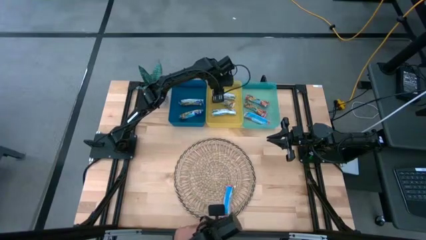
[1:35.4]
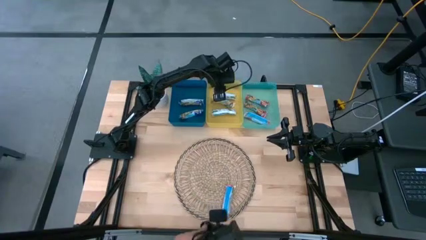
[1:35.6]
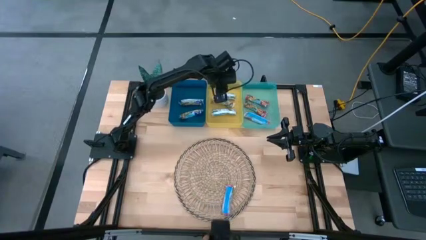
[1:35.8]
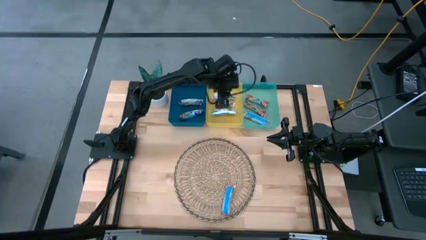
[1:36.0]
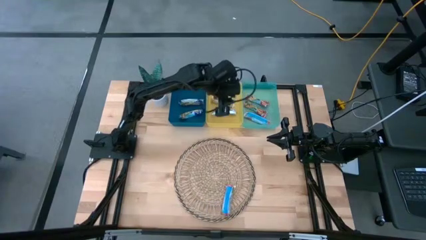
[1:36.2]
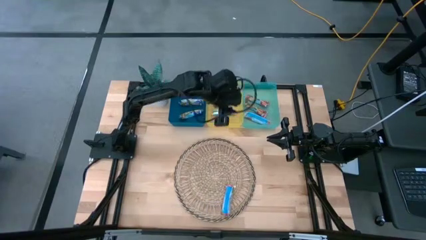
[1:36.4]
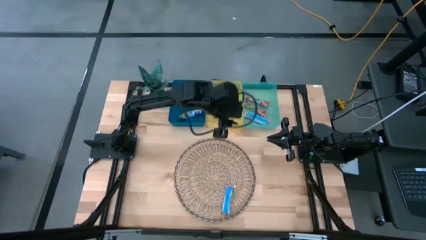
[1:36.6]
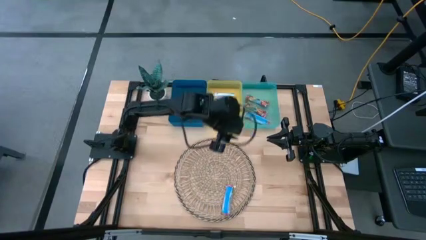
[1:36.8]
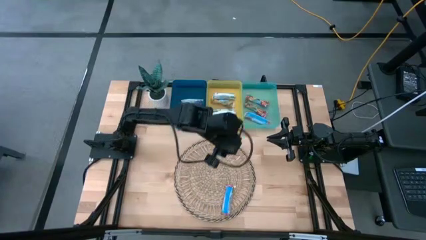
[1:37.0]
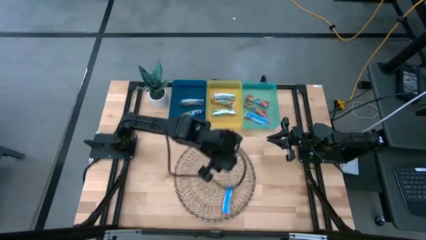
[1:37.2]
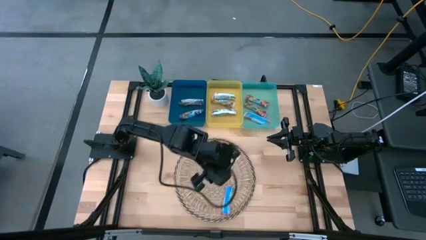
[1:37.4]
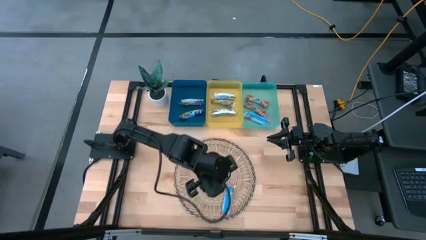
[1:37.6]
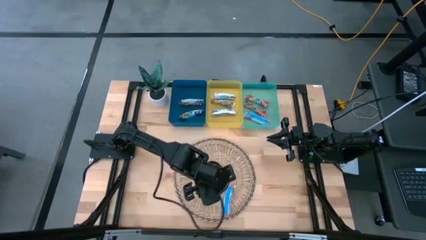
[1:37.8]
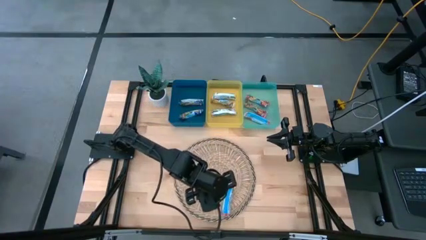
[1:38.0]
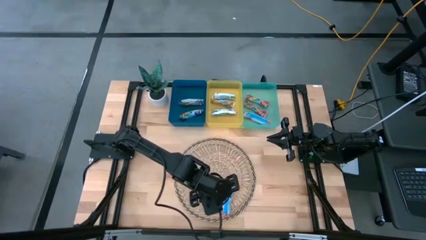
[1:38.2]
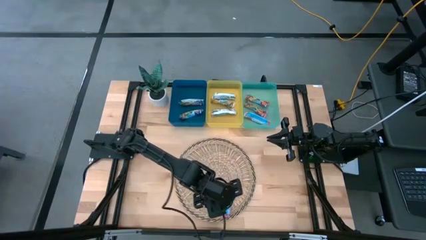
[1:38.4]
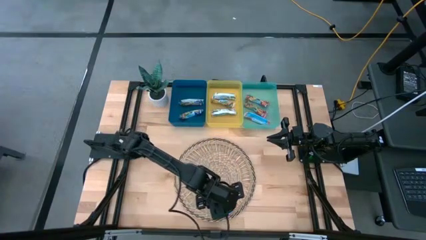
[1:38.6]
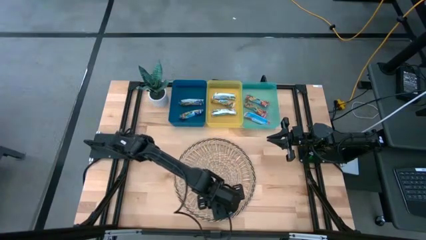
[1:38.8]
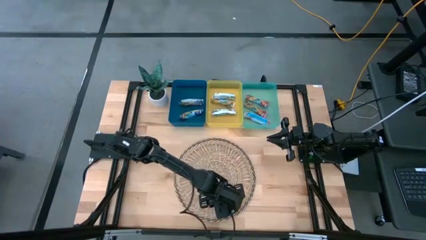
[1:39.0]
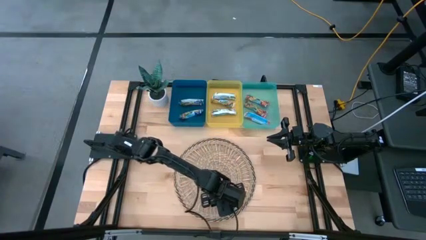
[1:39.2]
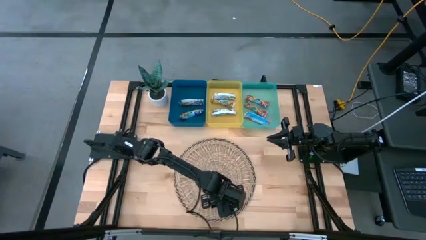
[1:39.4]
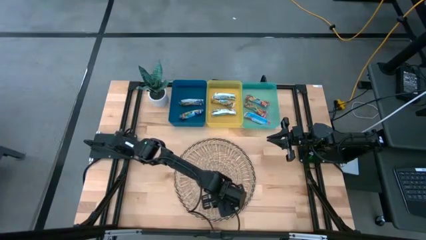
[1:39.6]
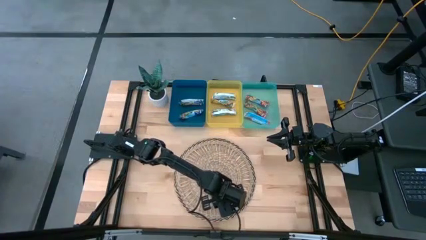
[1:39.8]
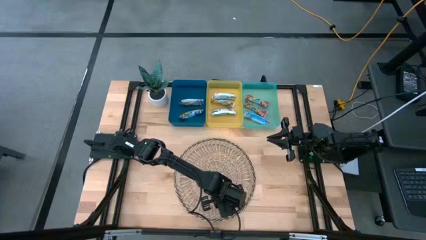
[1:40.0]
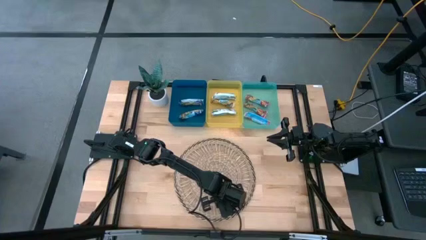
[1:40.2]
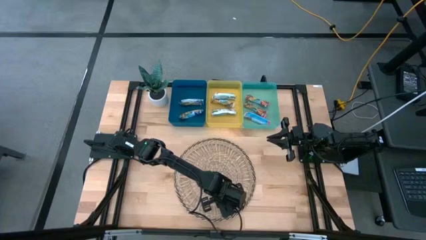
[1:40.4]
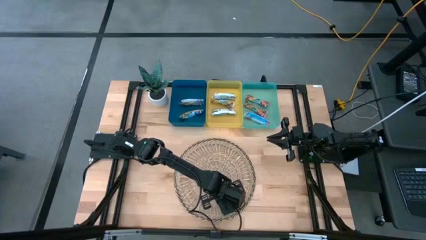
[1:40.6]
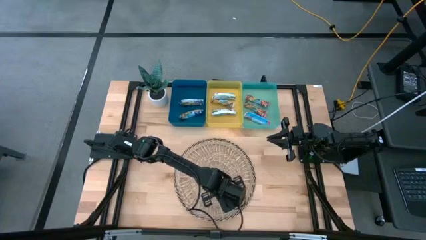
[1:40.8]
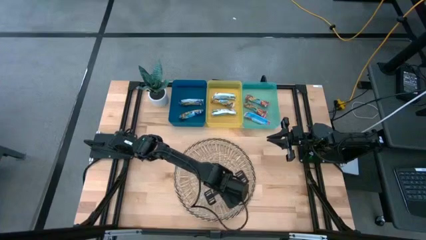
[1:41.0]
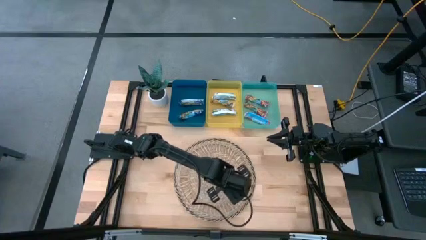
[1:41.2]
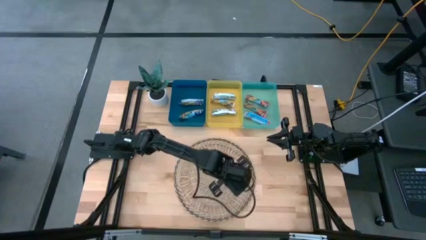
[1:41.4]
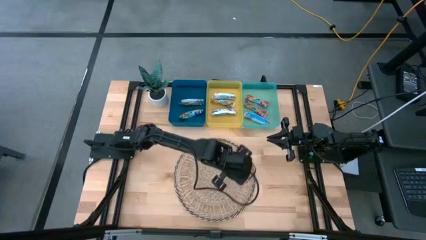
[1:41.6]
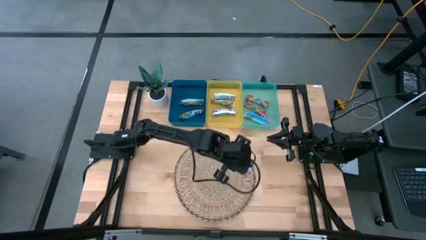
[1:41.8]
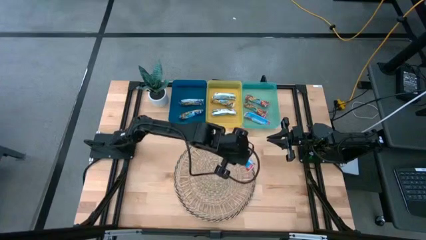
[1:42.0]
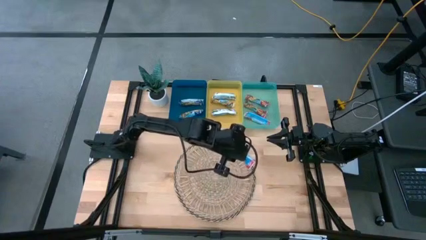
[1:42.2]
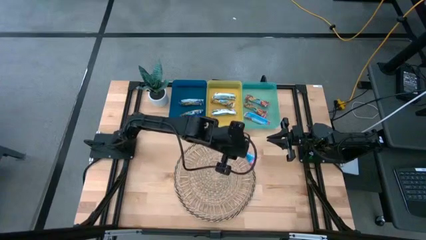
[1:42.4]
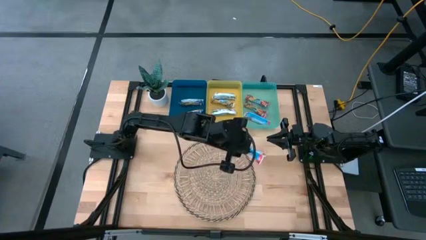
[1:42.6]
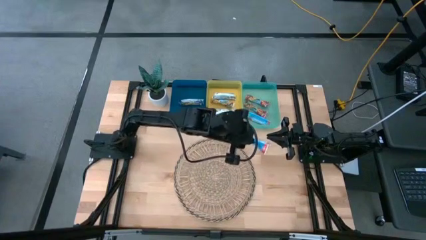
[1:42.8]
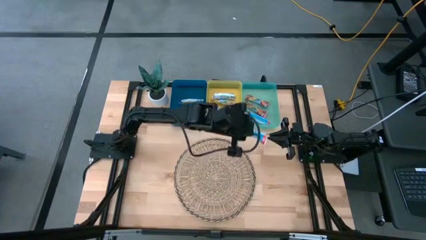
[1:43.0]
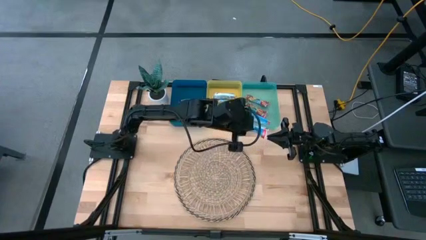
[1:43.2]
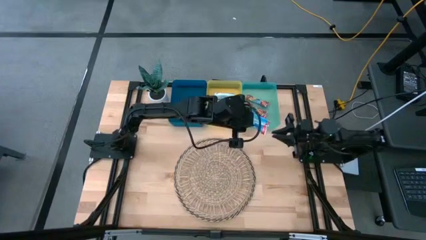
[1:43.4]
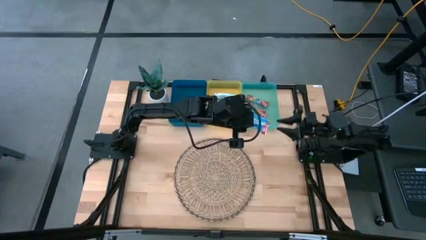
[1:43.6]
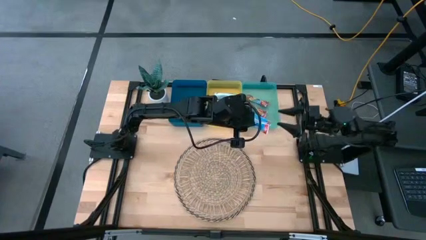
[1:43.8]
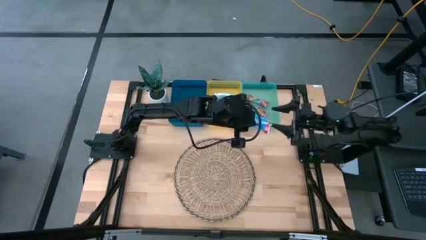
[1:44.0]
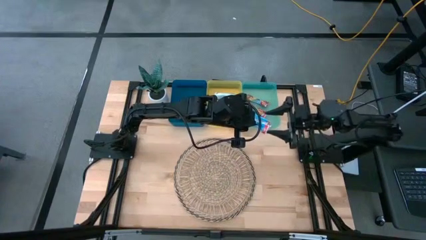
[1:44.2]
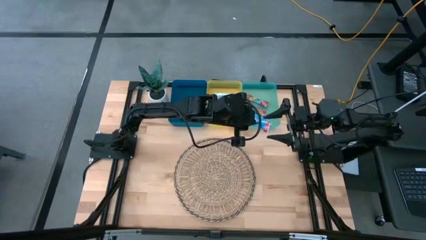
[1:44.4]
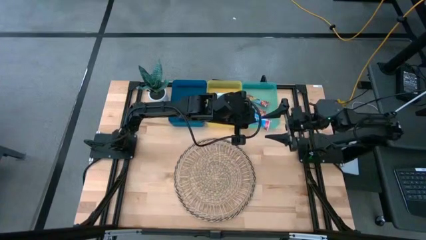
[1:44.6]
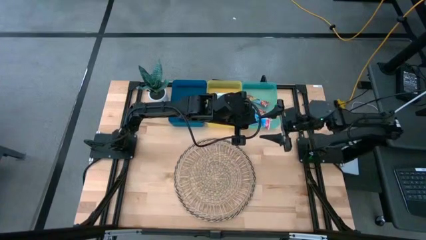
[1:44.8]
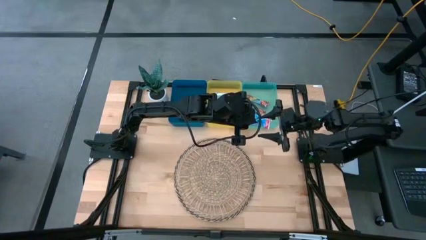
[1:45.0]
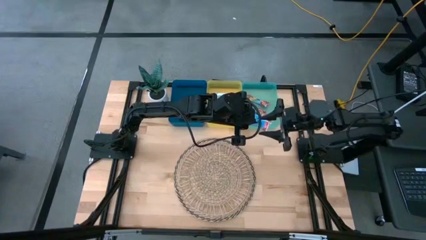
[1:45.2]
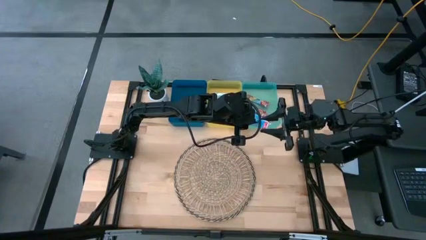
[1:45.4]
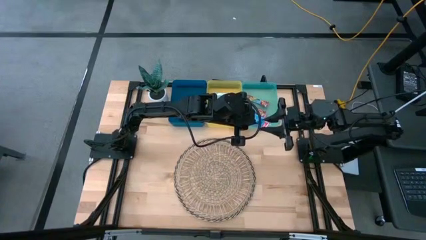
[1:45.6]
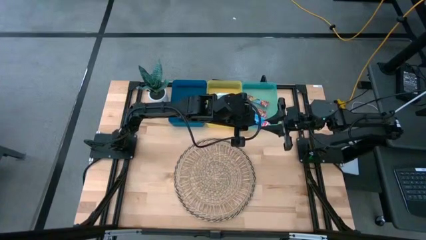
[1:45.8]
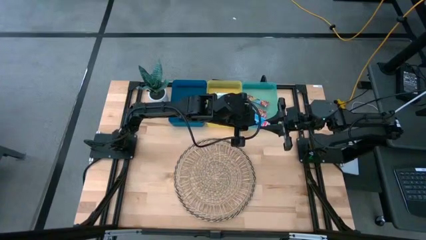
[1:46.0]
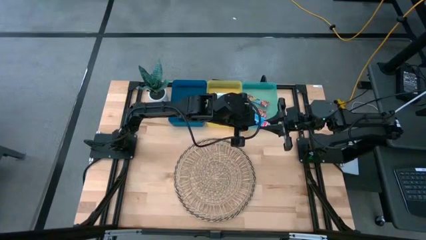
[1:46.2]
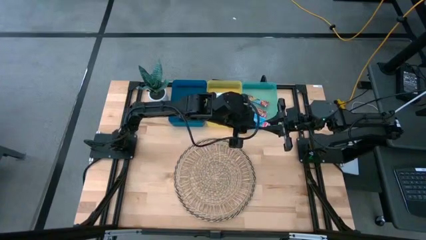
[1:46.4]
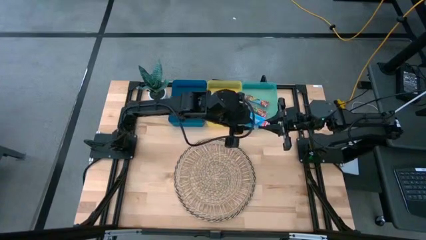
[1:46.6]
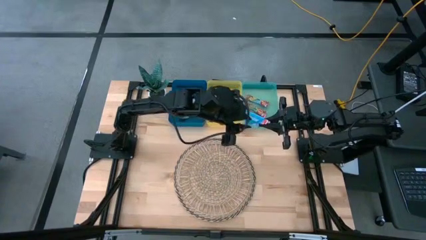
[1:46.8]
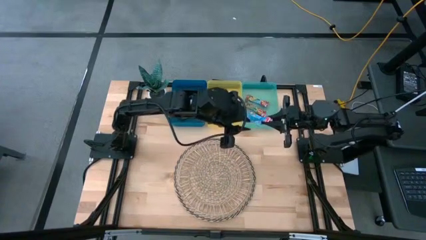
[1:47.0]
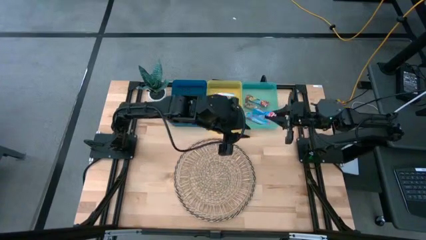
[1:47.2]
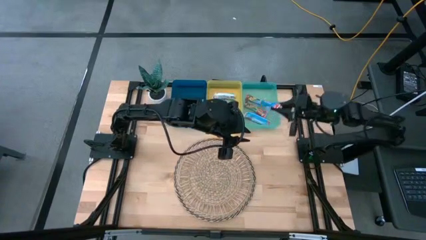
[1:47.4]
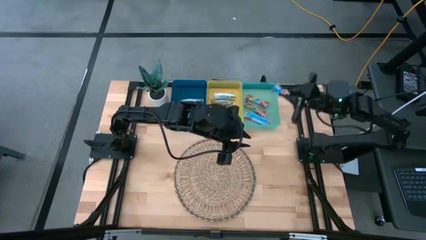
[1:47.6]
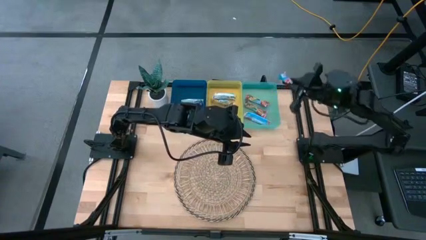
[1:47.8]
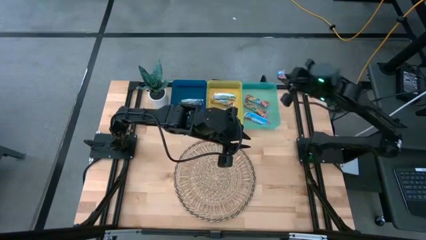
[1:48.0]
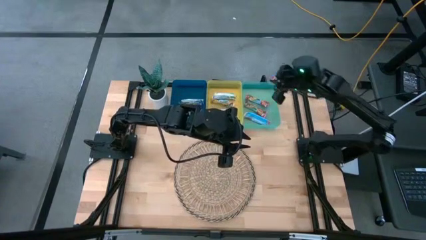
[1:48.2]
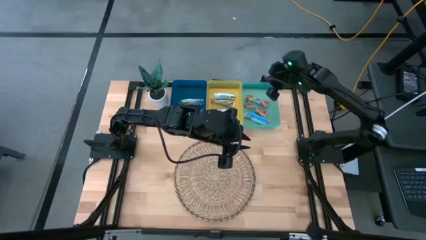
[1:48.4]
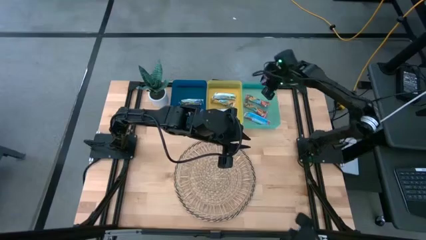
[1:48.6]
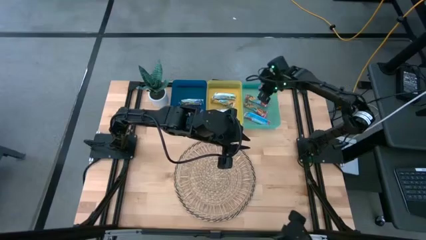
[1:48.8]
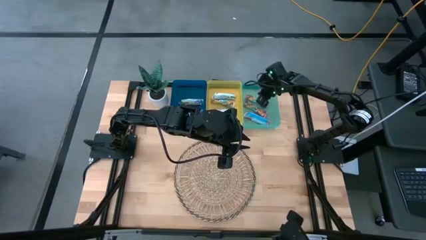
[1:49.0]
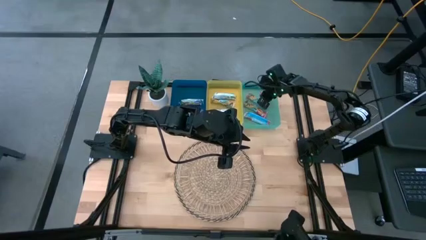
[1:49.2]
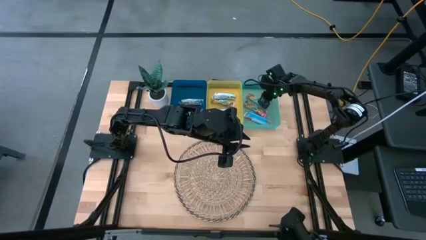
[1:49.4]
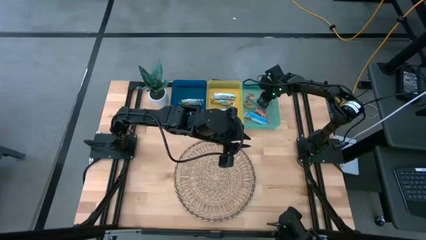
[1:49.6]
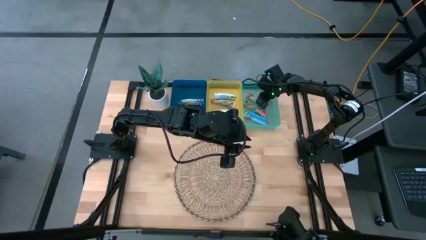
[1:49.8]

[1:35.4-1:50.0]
Task: Pick and place Granola Bars by type
Put the red granola bar into the green bin

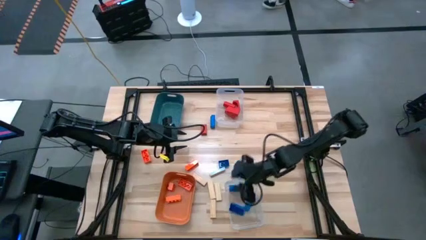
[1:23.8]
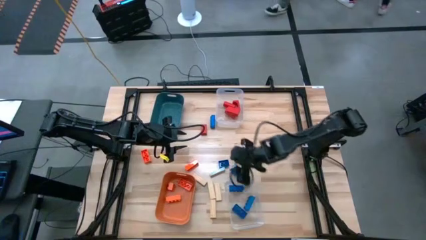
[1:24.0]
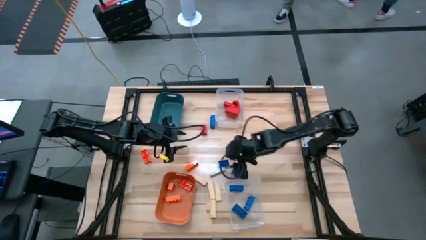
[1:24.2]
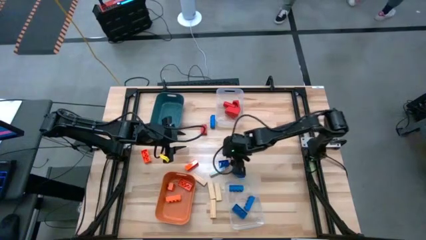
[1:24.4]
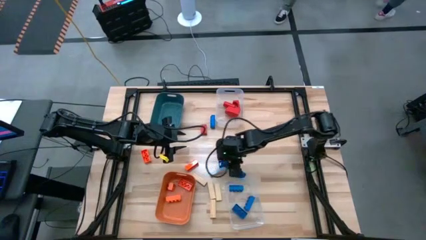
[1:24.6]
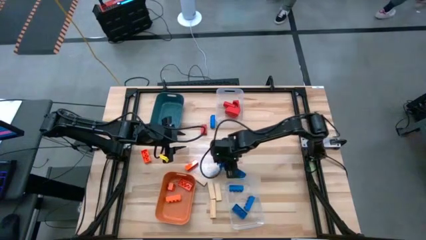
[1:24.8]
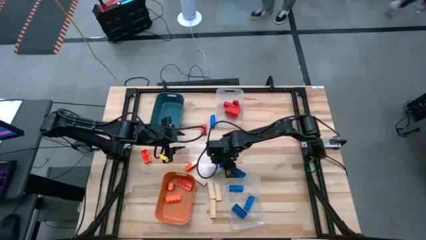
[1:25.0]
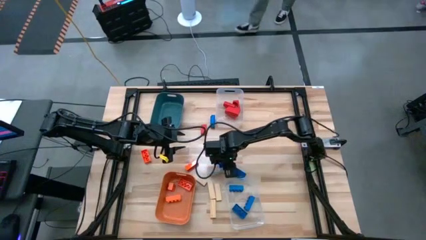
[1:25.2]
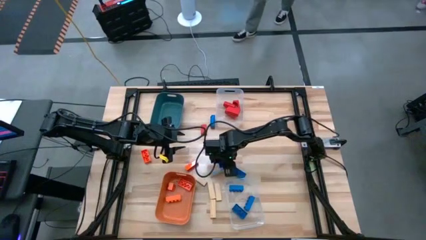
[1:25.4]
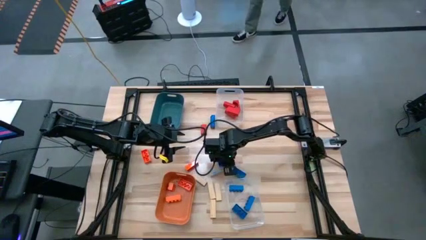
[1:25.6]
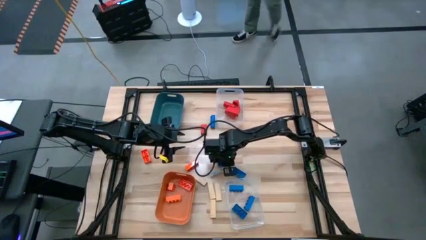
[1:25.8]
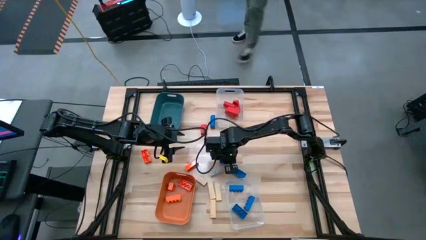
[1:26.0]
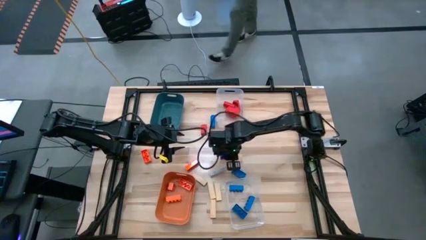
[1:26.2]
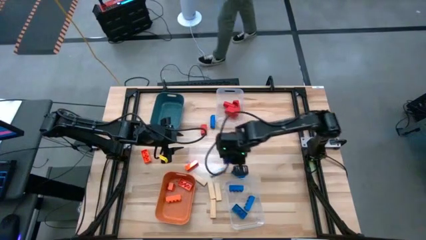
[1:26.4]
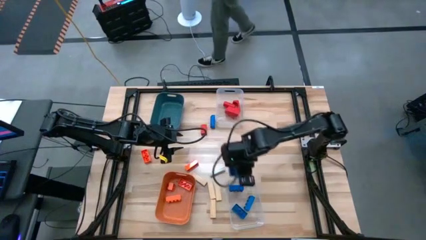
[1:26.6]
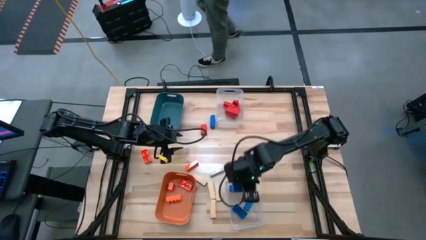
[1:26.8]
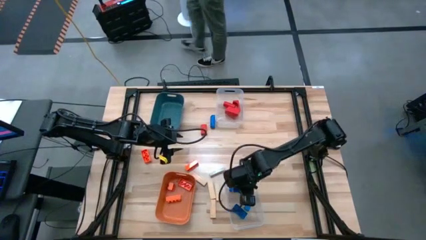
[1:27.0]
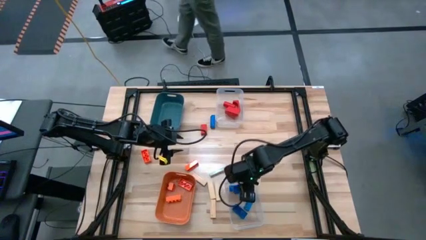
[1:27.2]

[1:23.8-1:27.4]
Task: Sort blocks
Put the blue game piece into the bottom transparent bin
